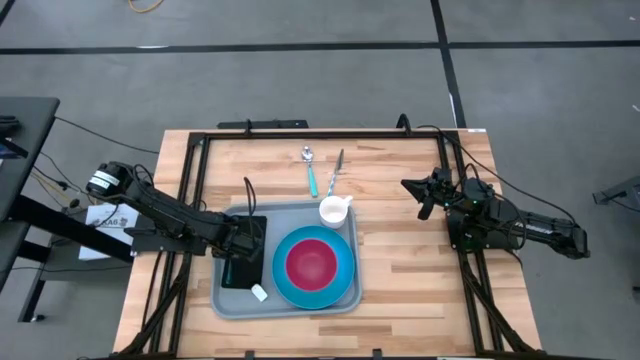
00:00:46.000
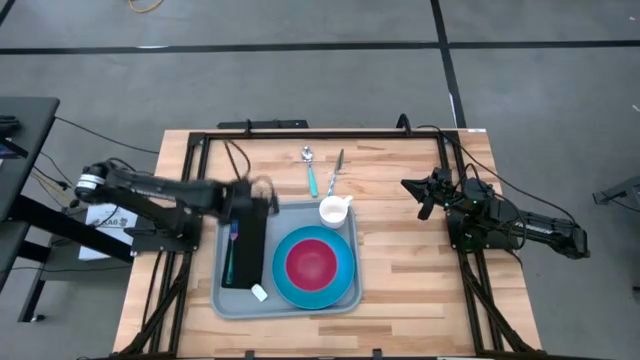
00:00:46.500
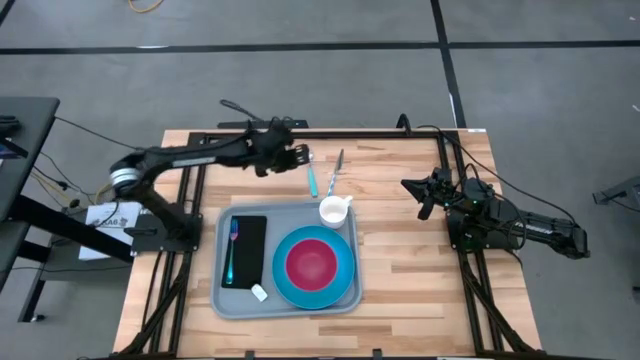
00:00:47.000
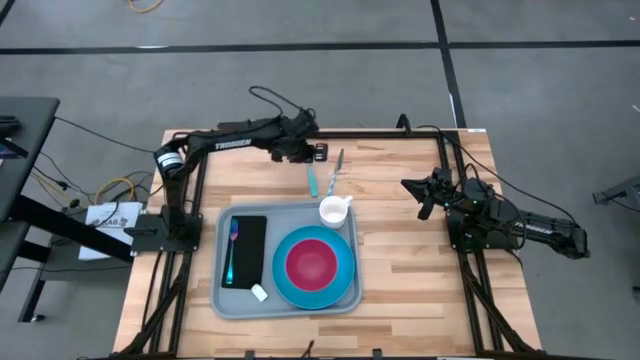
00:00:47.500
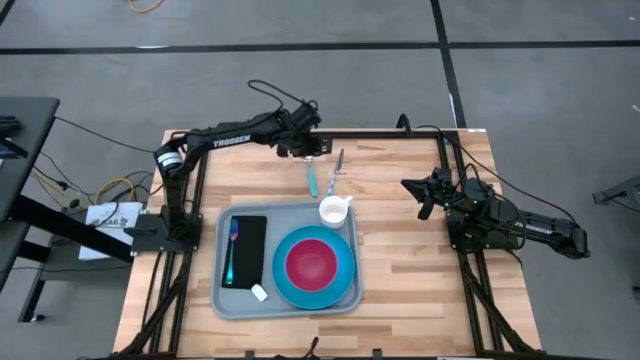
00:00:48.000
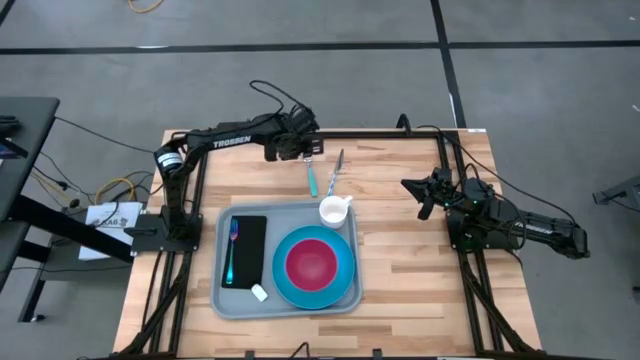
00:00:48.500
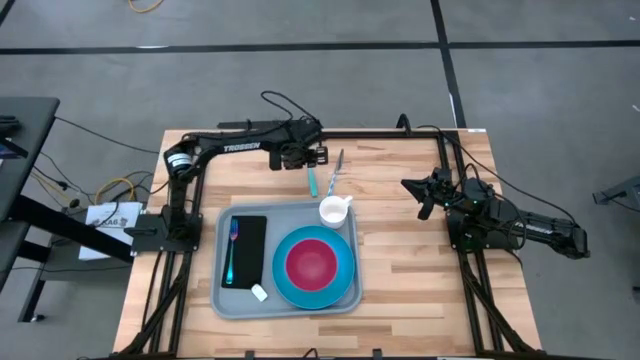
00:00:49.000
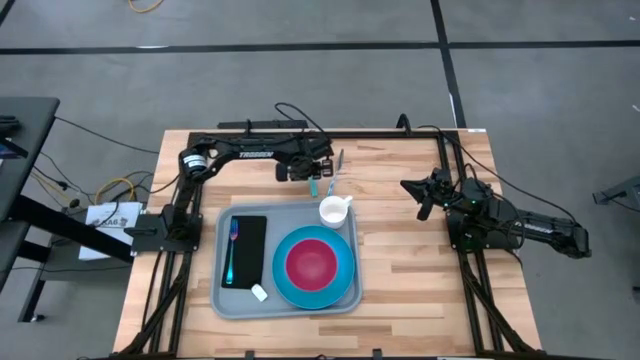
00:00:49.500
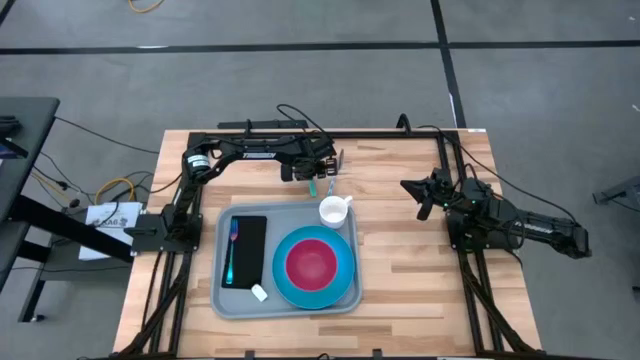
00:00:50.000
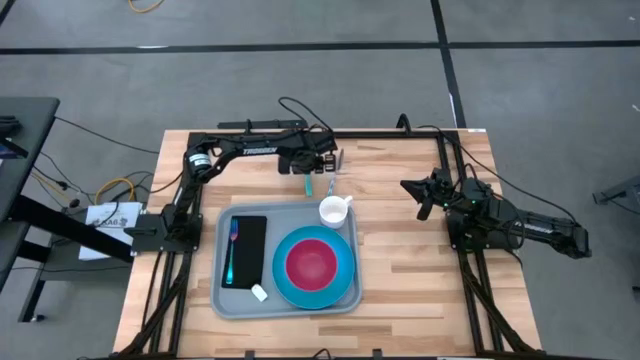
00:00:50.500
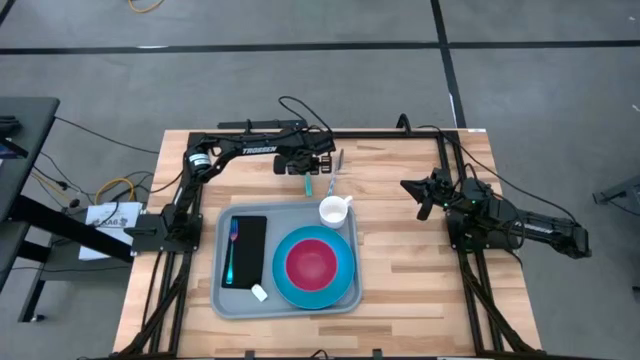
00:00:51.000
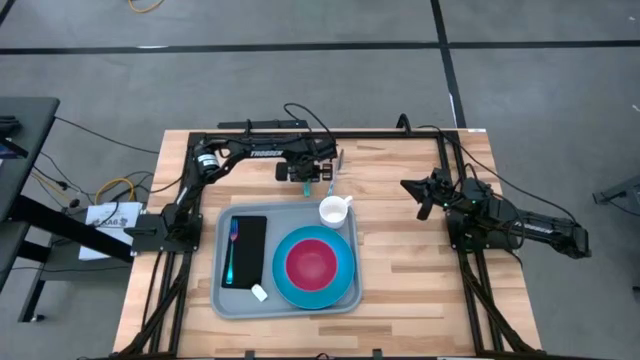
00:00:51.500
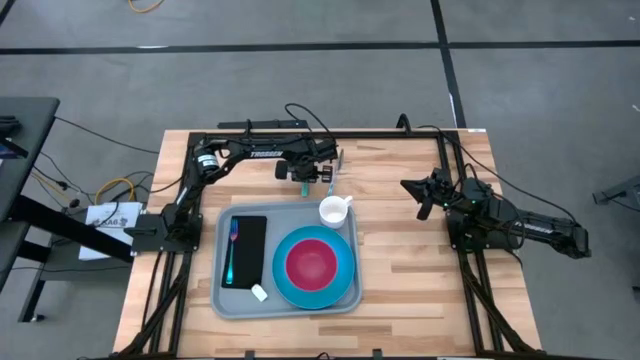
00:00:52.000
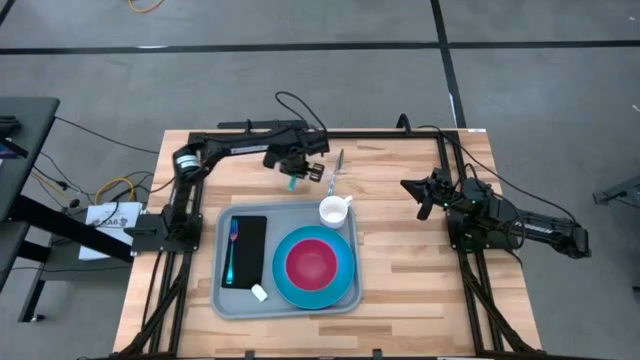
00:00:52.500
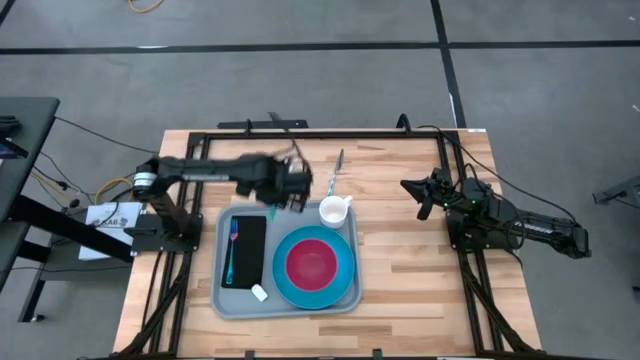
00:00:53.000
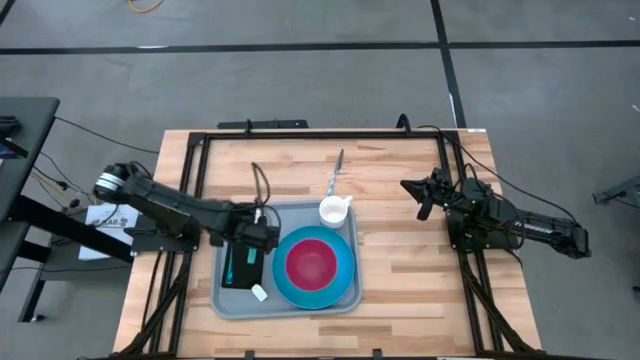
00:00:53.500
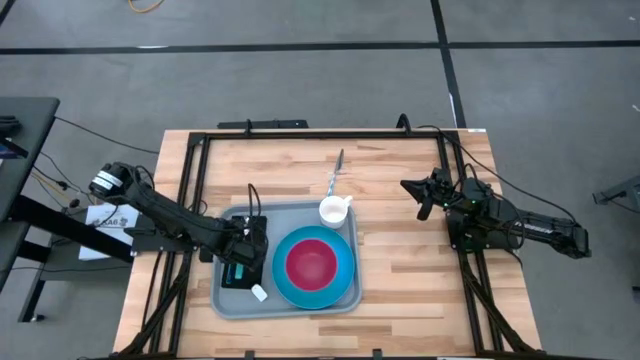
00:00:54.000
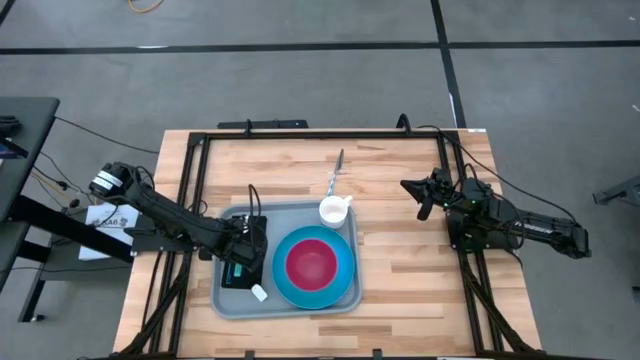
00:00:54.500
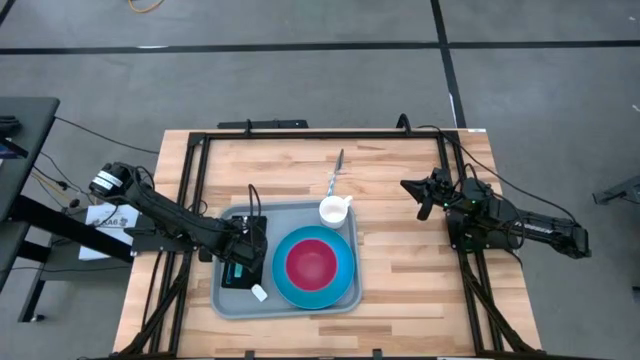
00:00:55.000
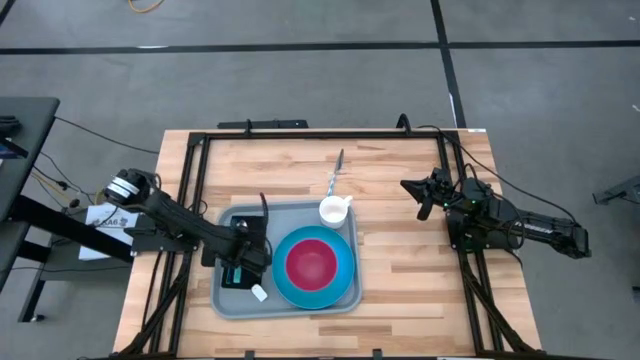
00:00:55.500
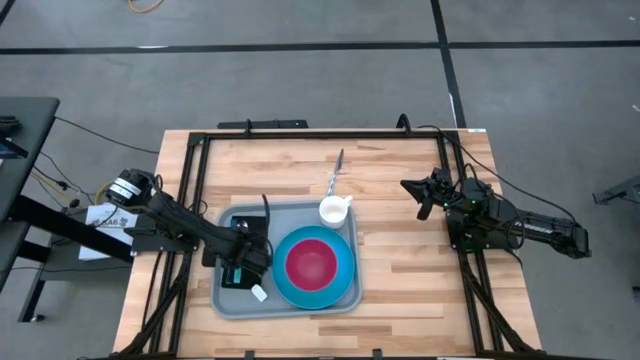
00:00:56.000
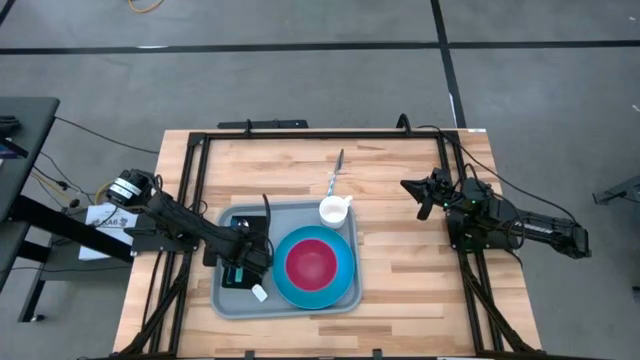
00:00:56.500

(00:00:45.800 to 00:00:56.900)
Task: Set up tray
Put the light blue spoon on the black napkin to the right of the blue fork

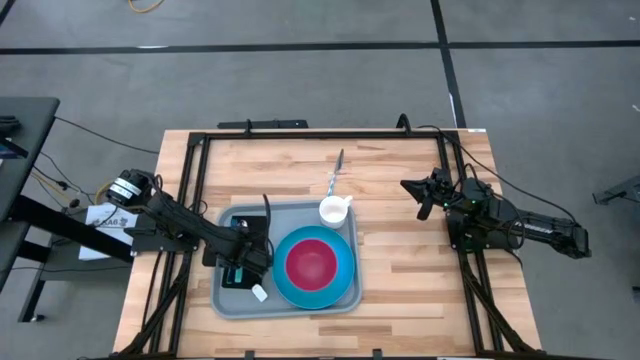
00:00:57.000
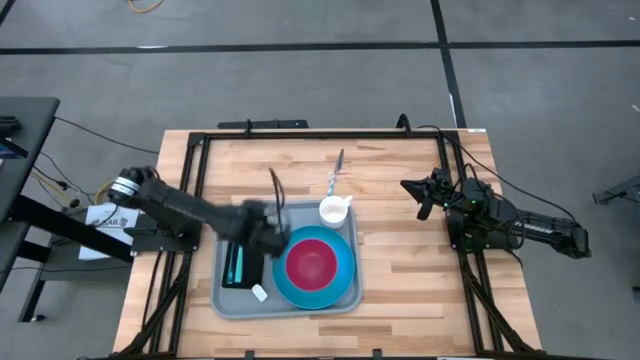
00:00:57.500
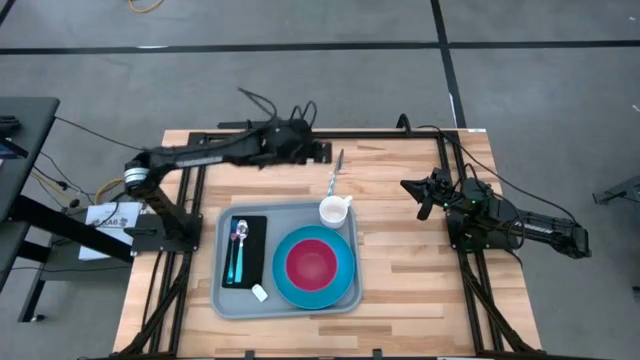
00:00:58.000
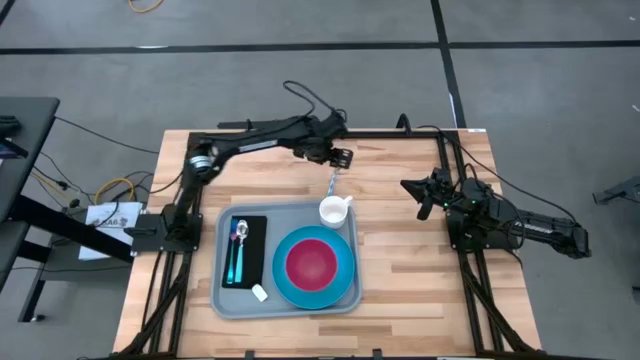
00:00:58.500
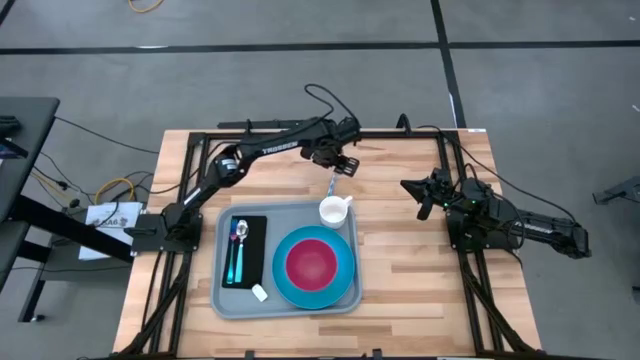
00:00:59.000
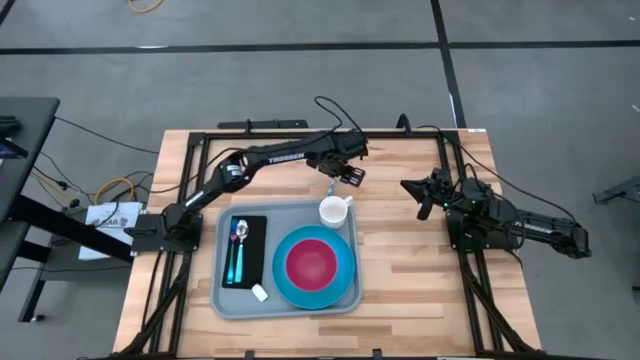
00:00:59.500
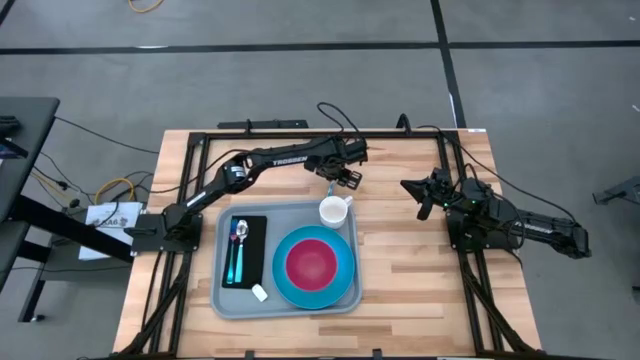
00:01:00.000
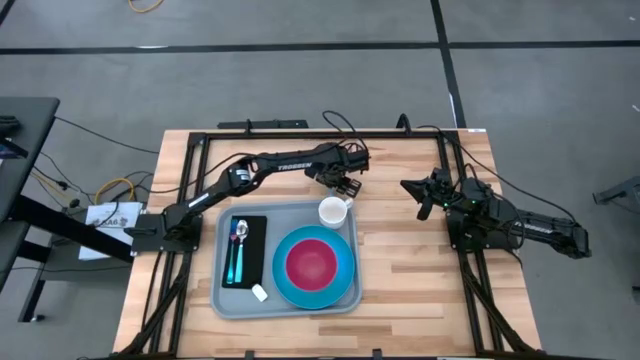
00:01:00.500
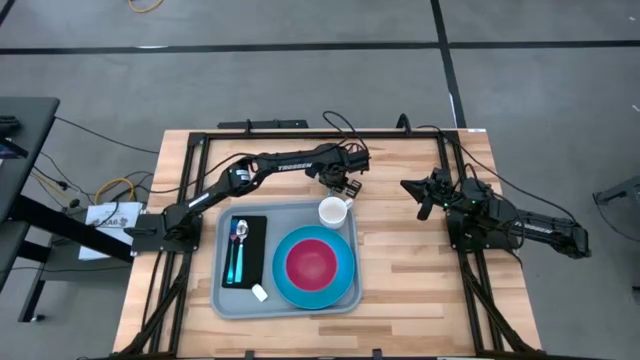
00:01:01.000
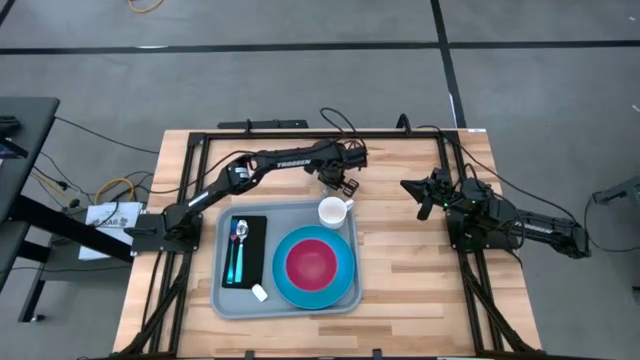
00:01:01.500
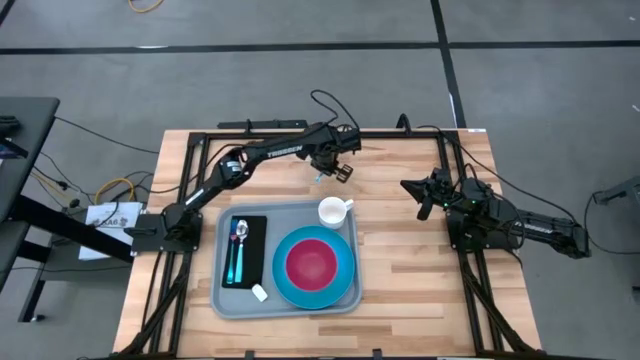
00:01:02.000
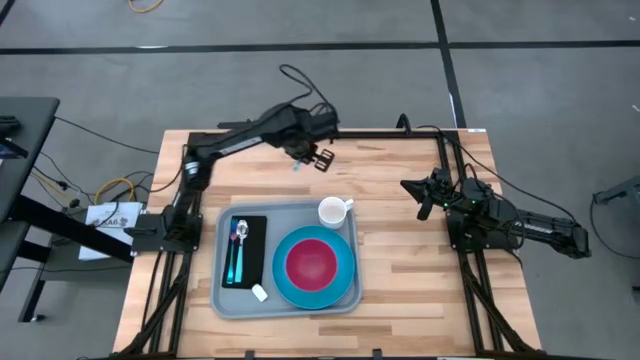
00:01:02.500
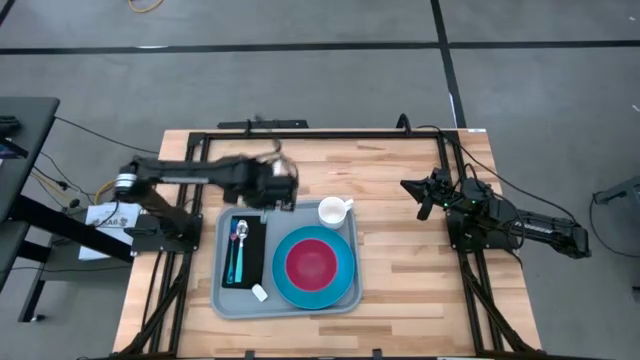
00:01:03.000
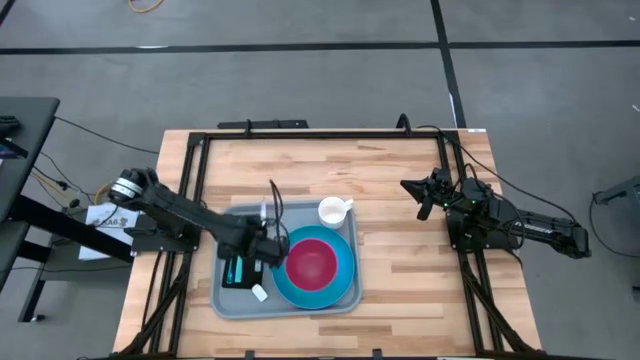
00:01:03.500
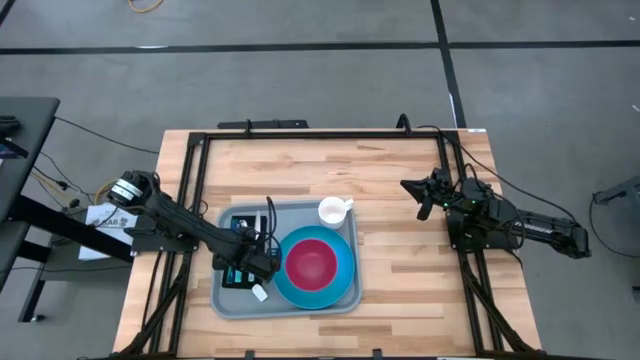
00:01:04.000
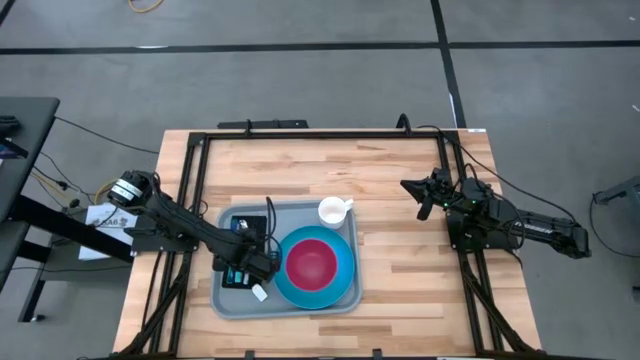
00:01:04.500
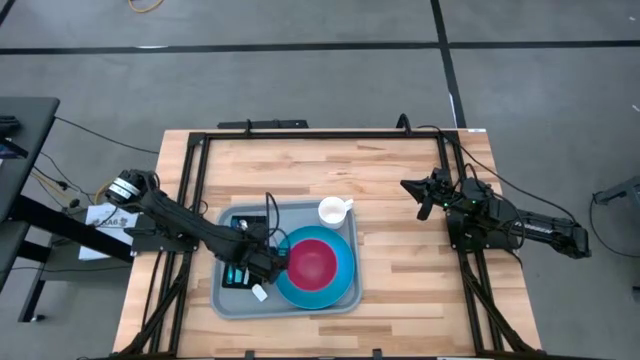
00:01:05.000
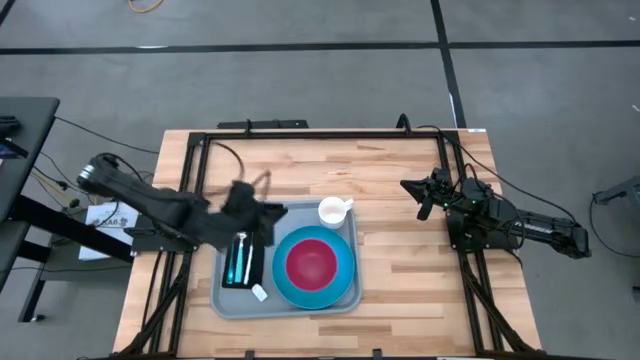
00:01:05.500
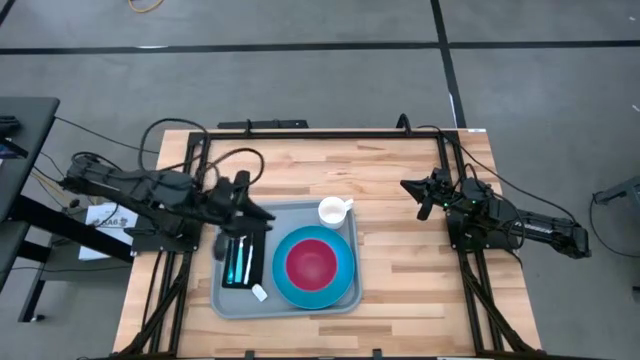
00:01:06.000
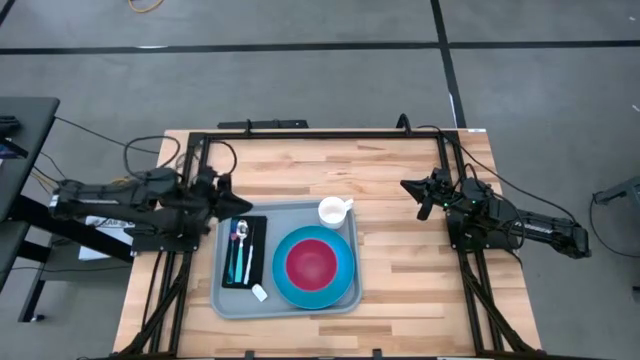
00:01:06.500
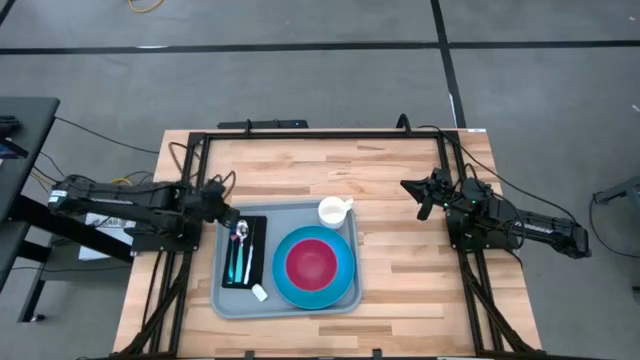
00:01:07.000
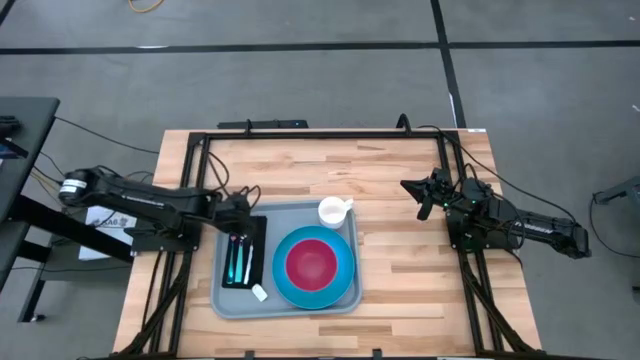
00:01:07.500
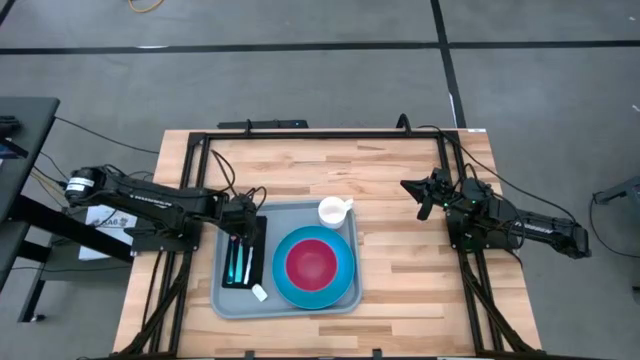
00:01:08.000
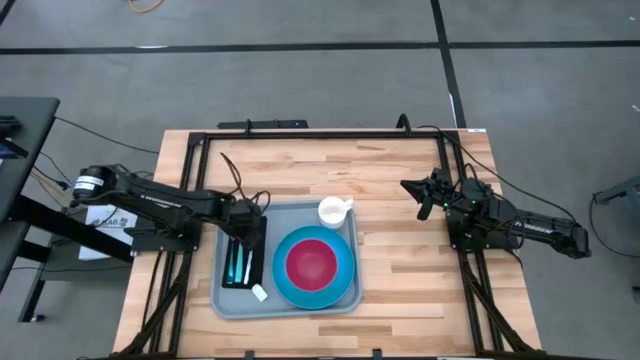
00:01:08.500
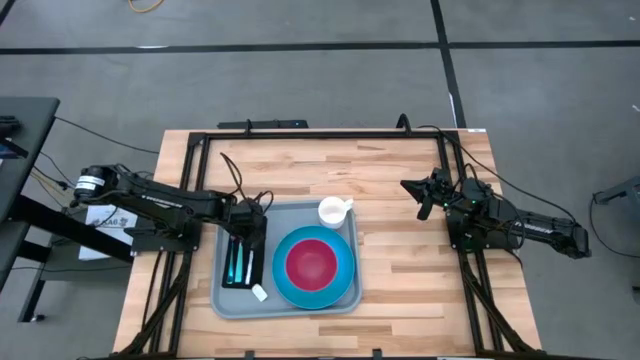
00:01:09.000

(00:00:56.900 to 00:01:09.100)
Put the blue patterned knife on the black napkin to the right of the light blue spoon
